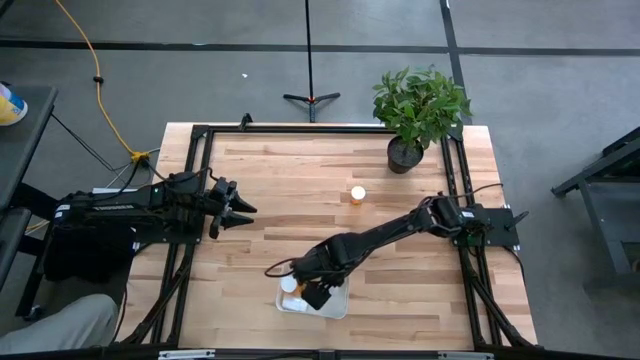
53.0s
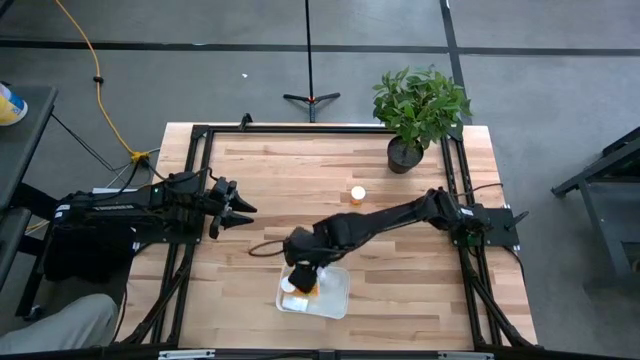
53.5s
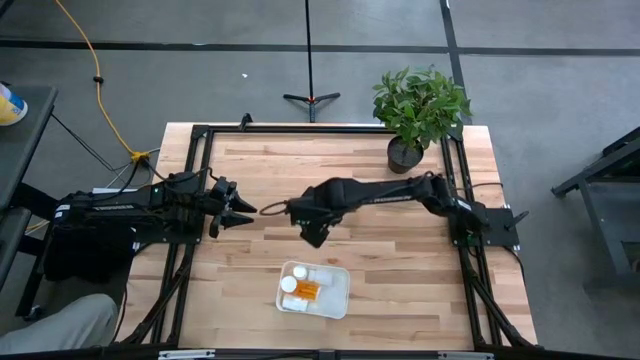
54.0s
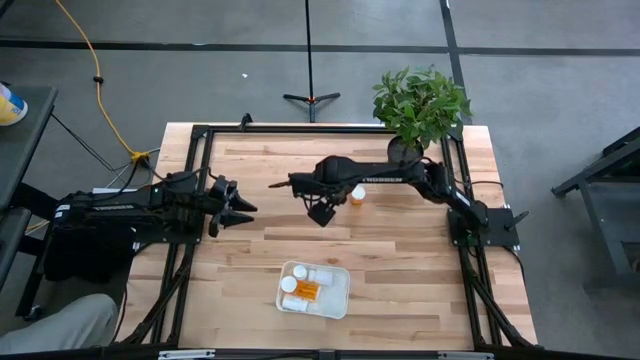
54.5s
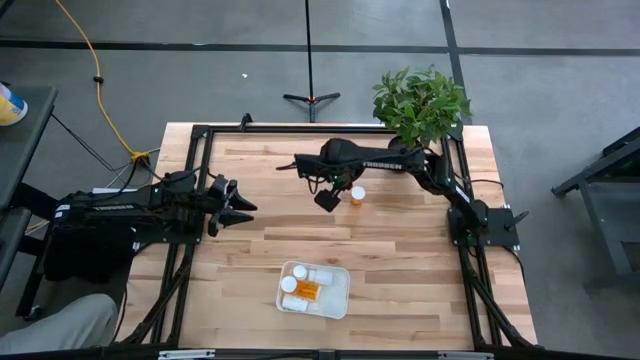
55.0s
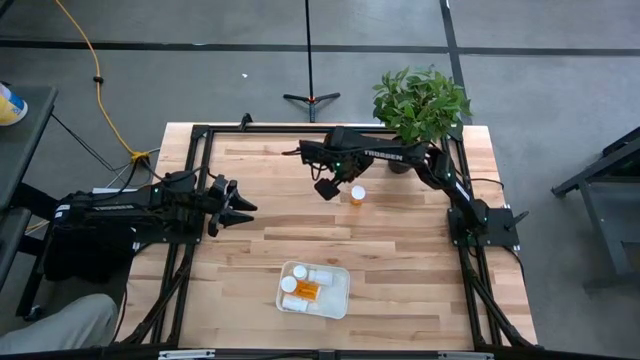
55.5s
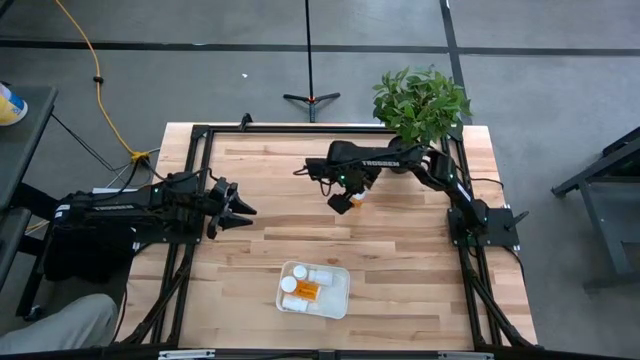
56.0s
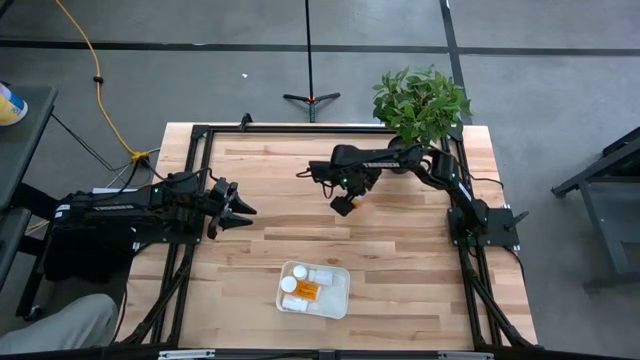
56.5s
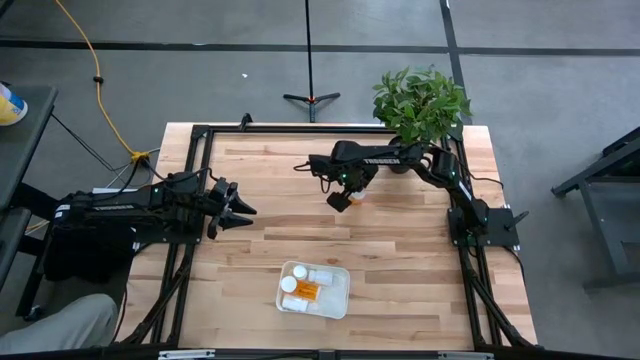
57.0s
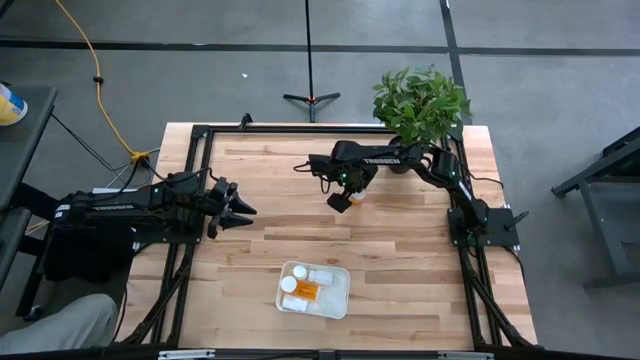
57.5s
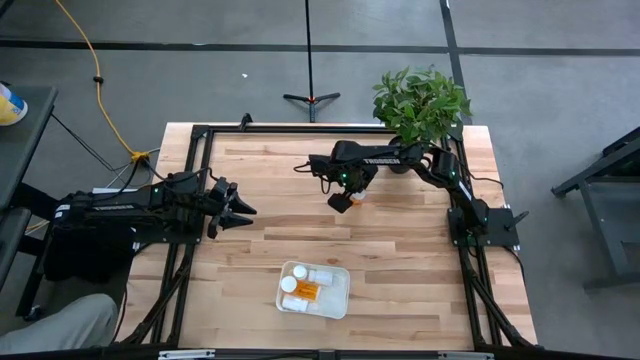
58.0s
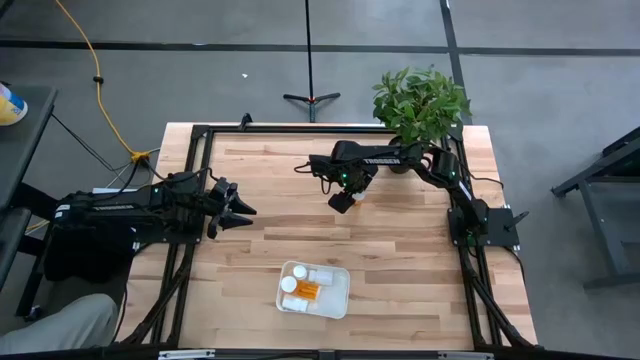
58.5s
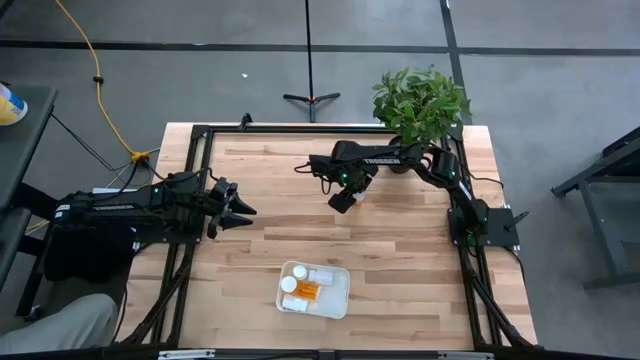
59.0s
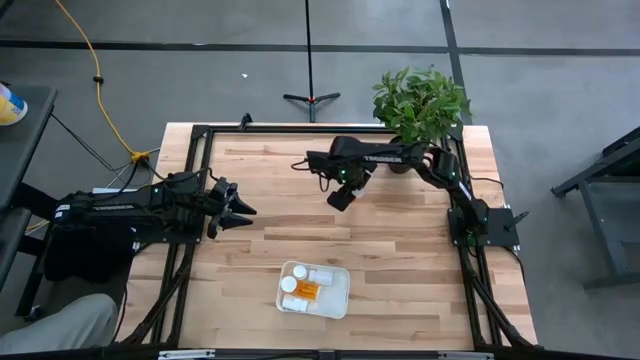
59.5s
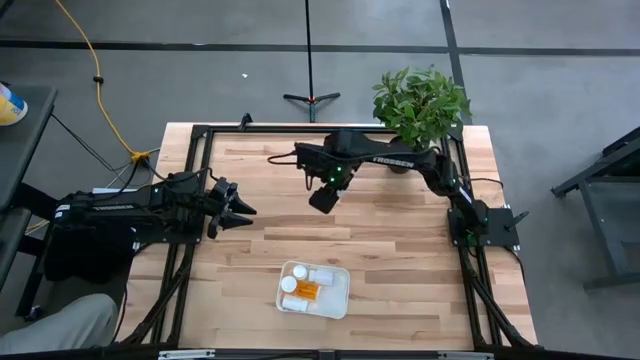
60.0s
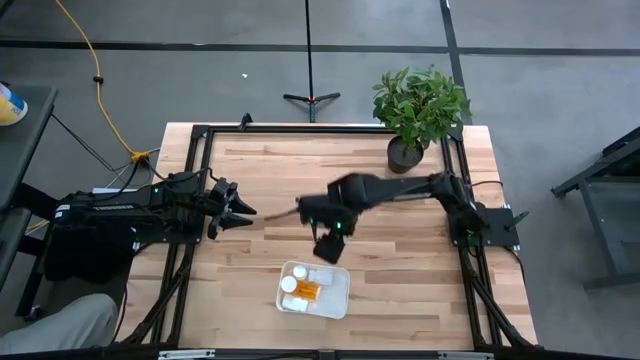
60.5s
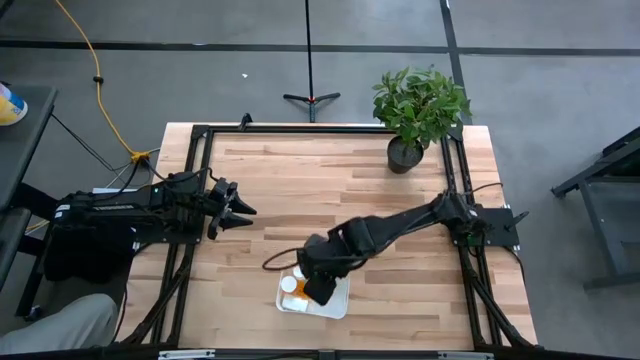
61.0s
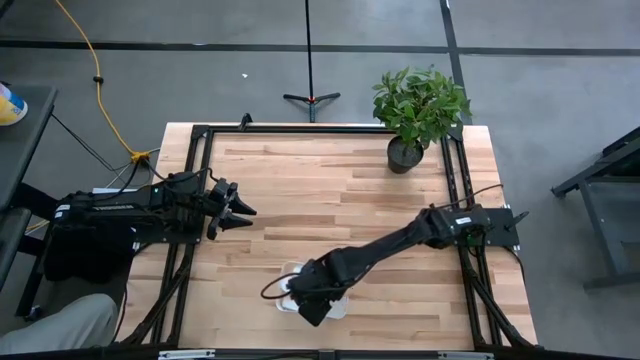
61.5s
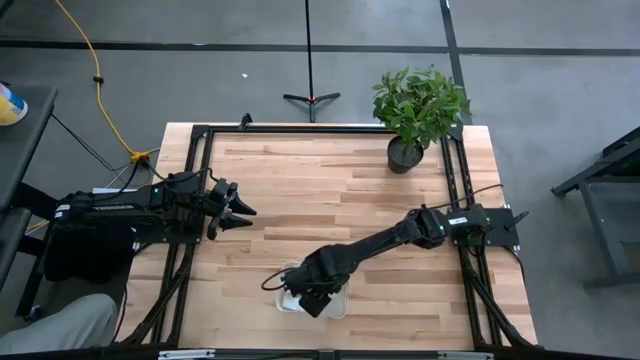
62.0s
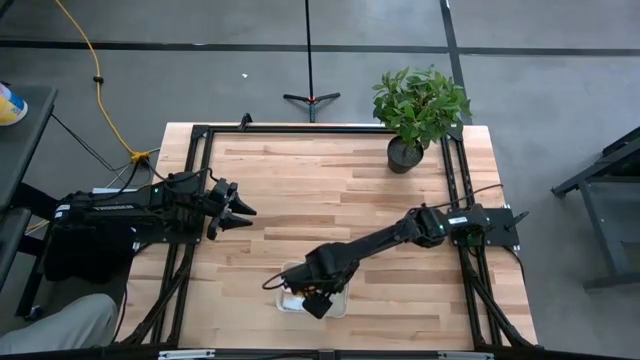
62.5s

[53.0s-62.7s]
Task: Pick and place pill bottles into a basket
Put the orange pill bottle into the white bin

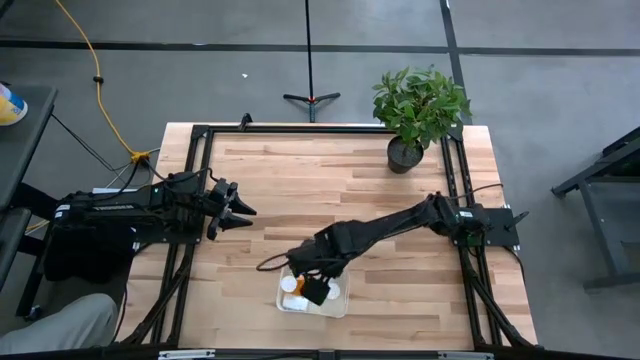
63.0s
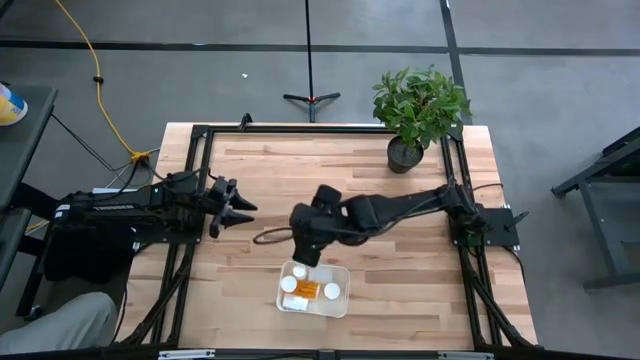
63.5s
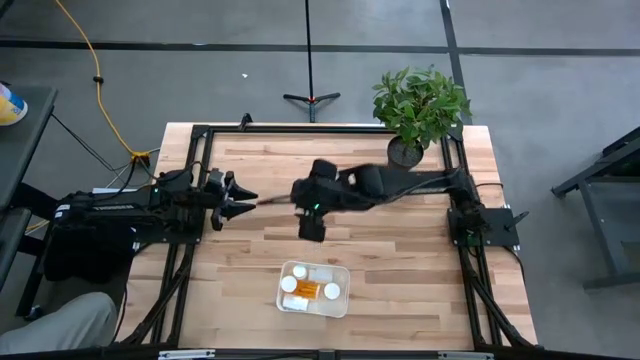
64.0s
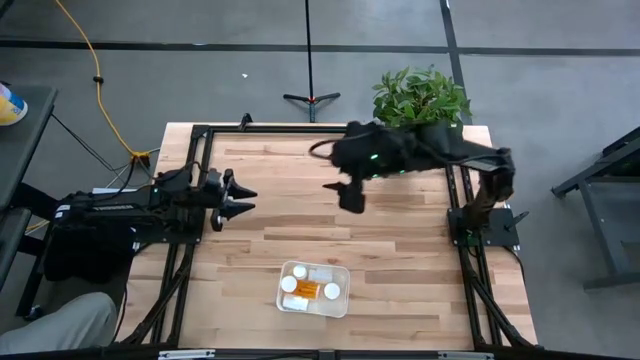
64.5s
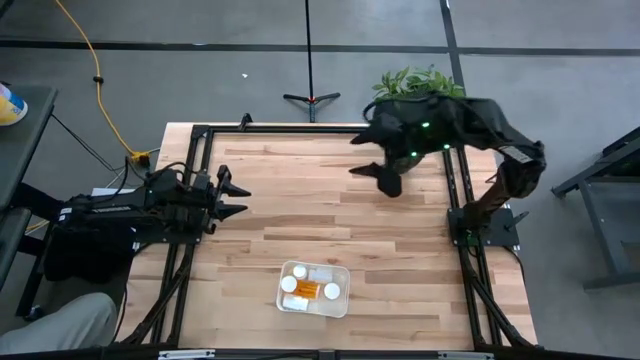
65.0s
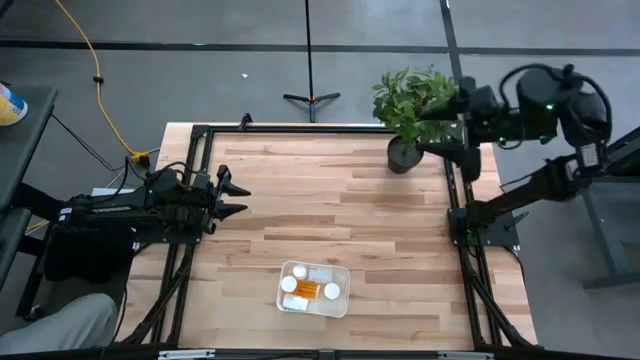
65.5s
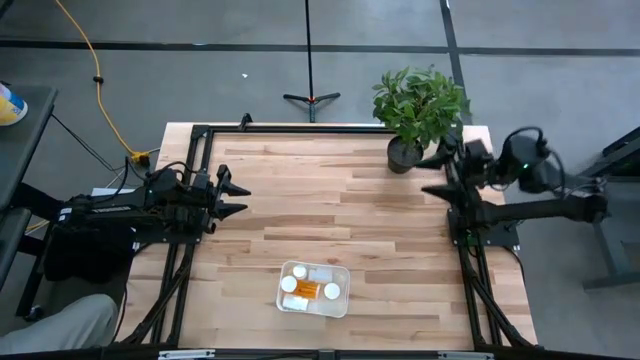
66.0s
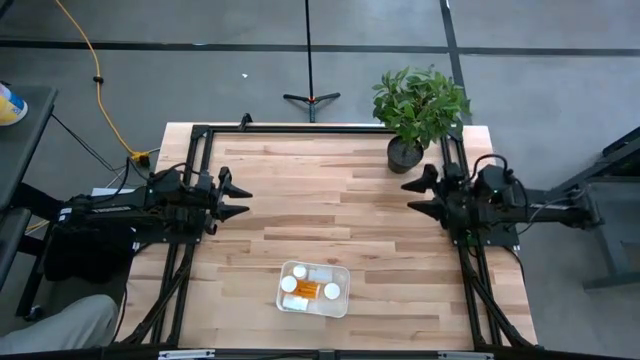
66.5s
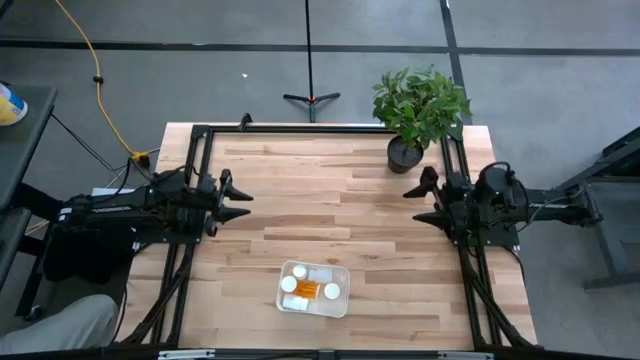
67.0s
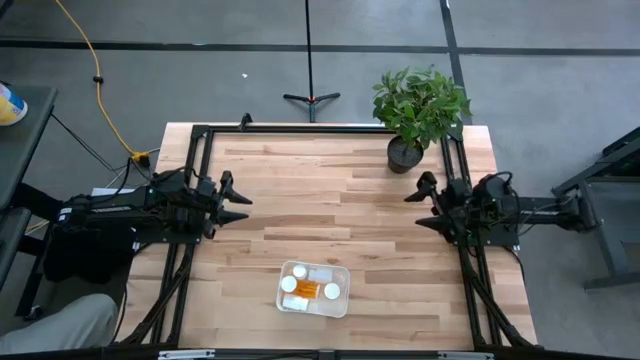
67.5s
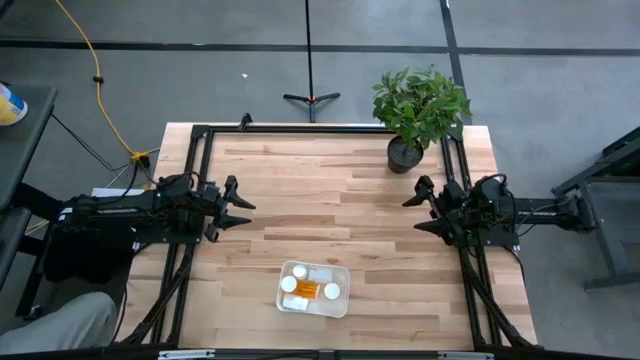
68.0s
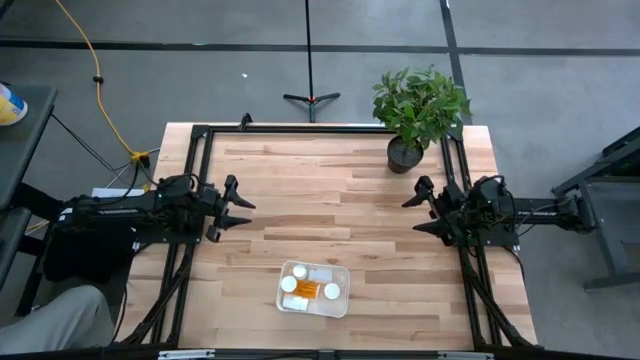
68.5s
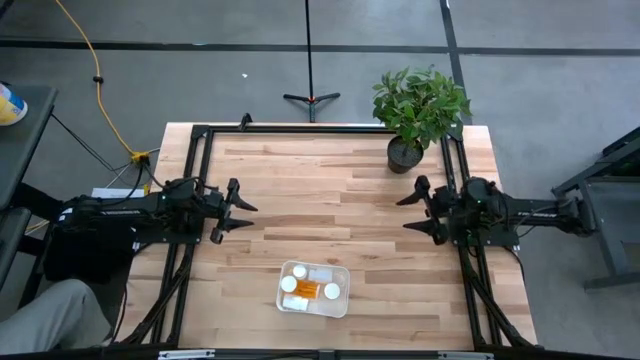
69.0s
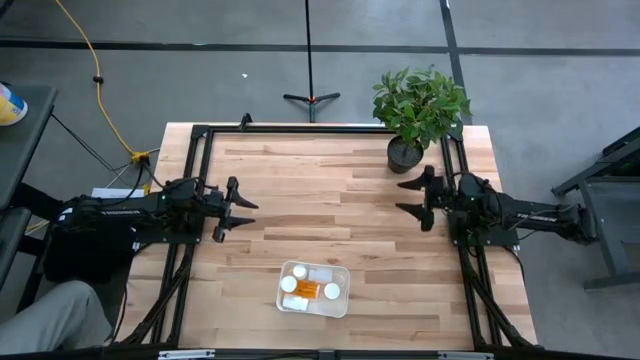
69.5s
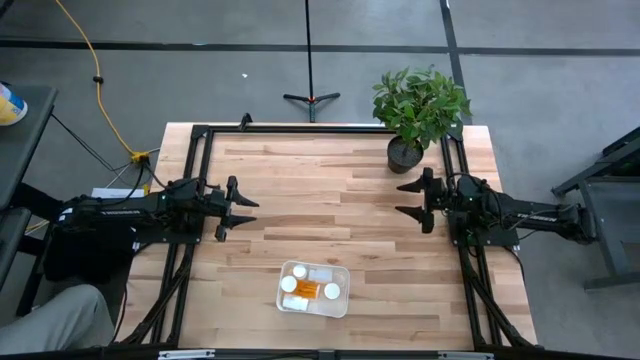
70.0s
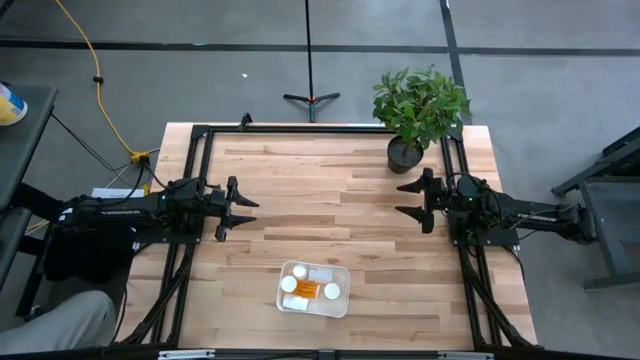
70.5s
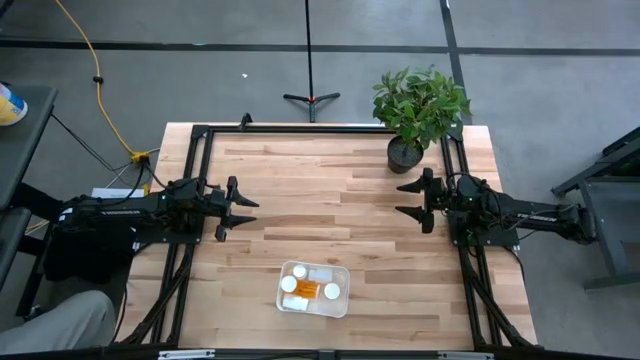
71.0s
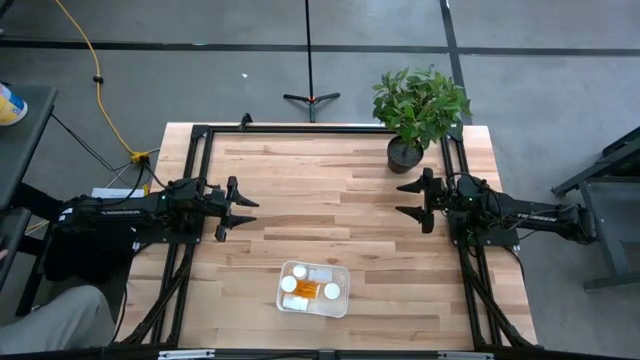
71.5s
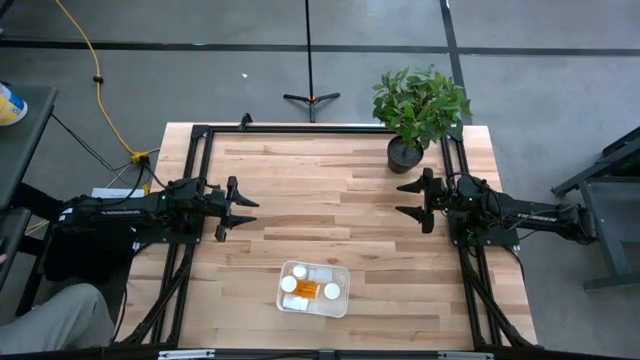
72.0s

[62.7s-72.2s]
Return to Home Position

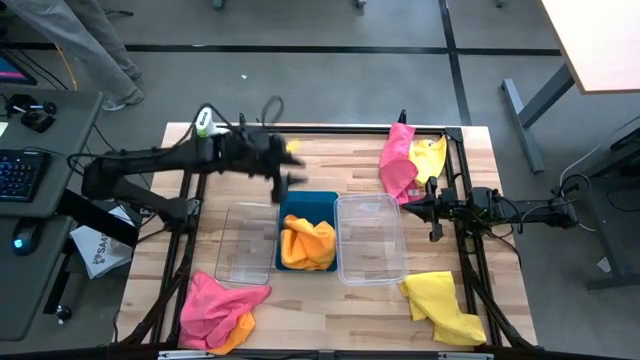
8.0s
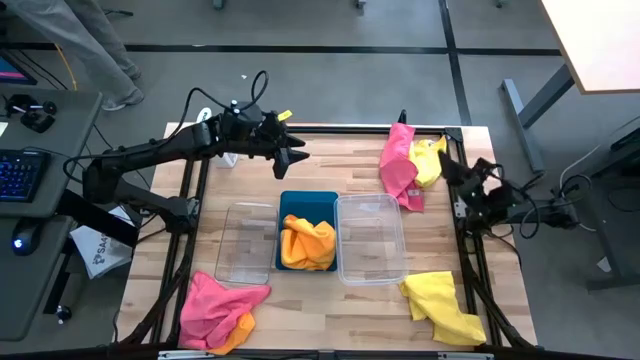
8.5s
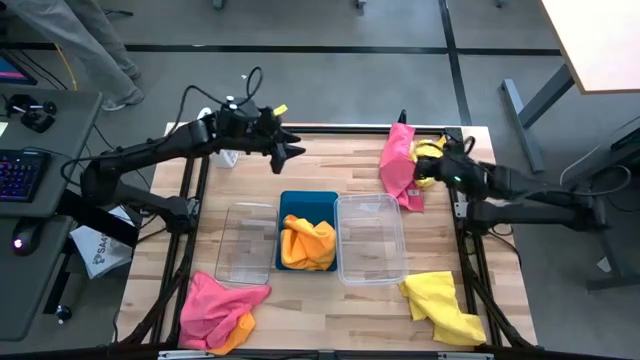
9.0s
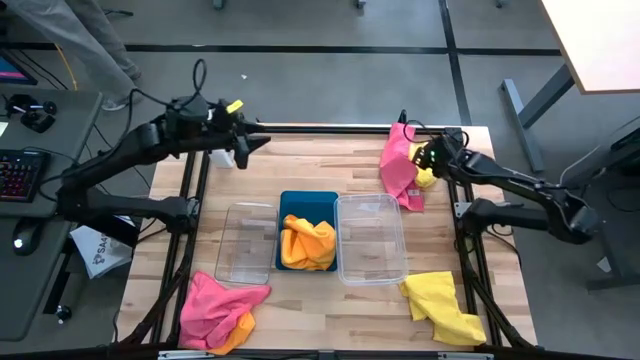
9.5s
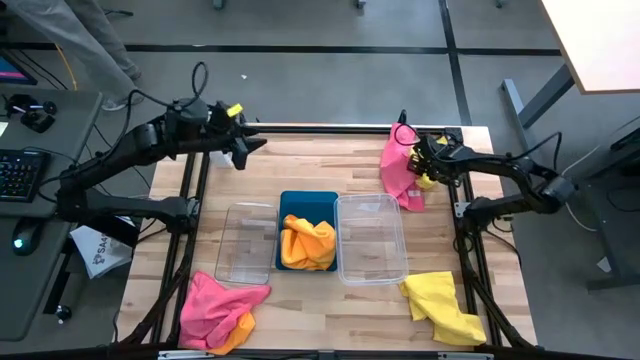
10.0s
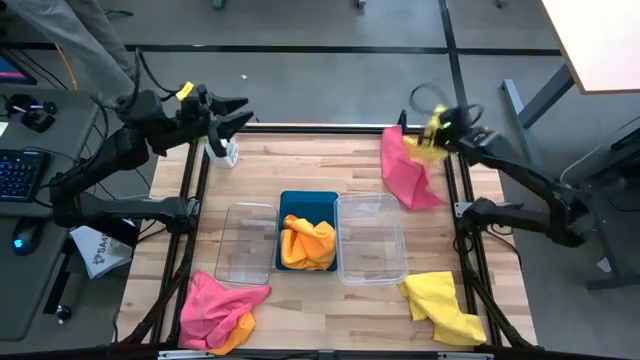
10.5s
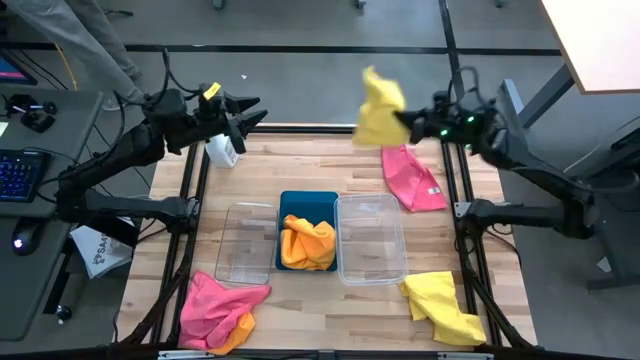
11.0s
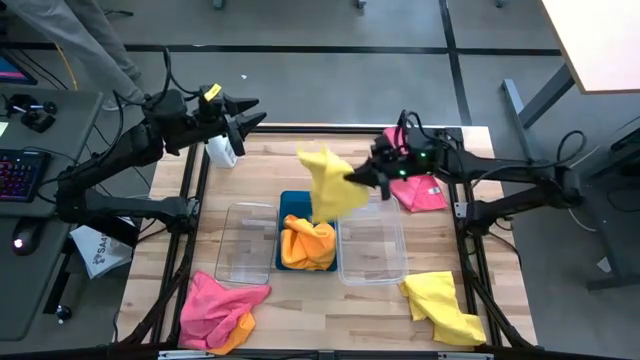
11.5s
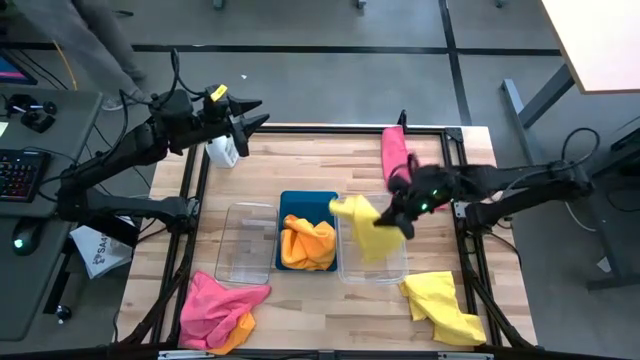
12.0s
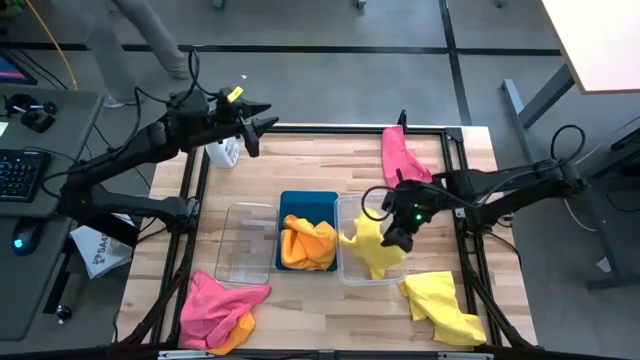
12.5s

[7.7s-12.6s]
Task: Sort microfiber towel by color & place in baskets
Put the top yellow microfiber towel into the right transparent bin
